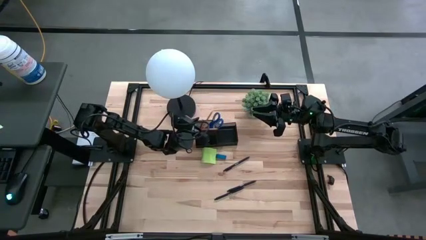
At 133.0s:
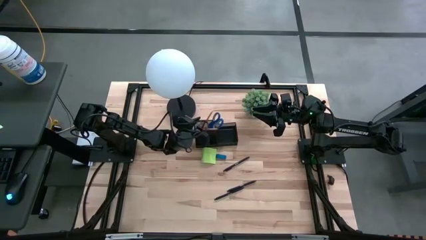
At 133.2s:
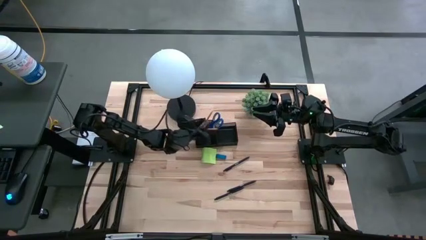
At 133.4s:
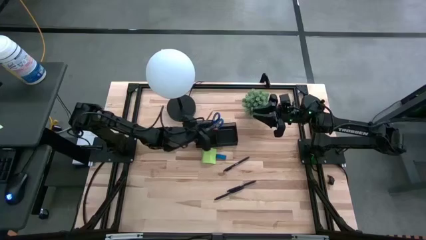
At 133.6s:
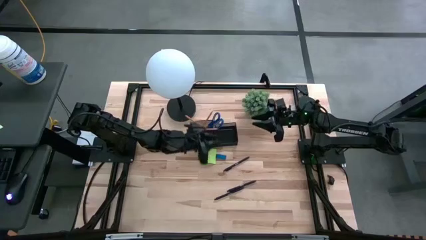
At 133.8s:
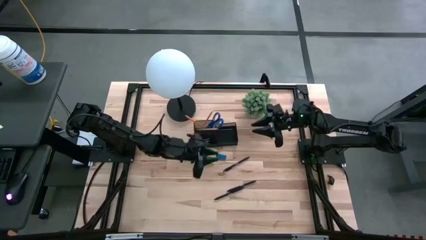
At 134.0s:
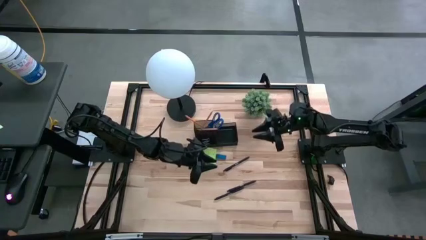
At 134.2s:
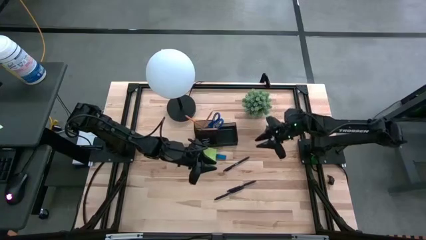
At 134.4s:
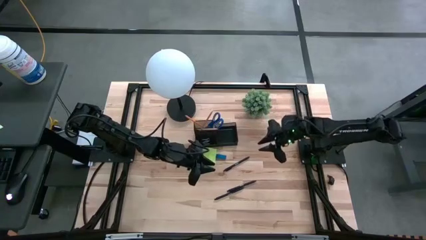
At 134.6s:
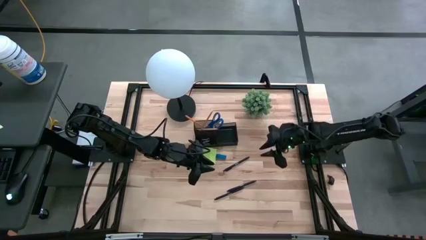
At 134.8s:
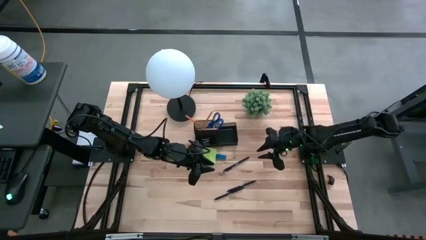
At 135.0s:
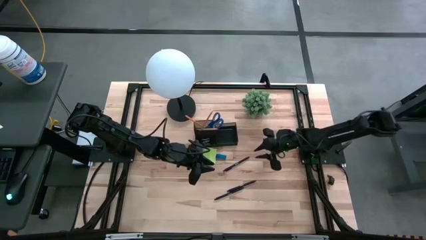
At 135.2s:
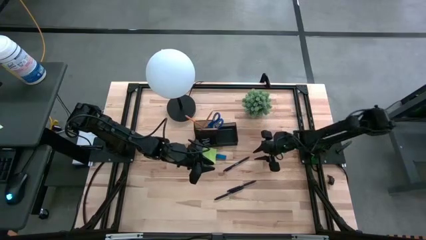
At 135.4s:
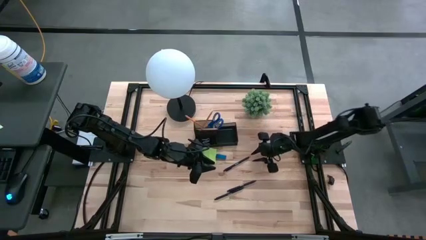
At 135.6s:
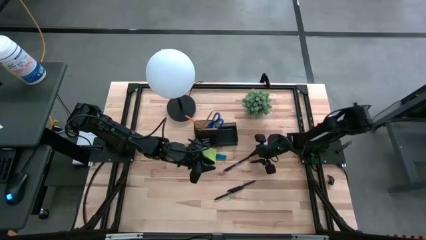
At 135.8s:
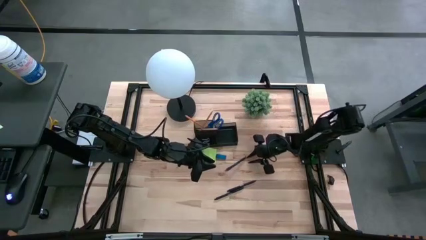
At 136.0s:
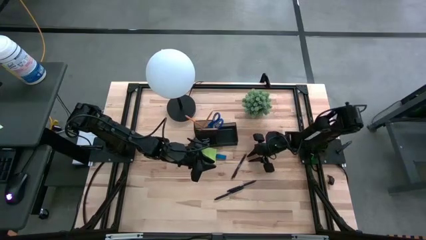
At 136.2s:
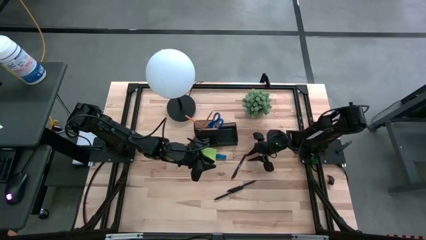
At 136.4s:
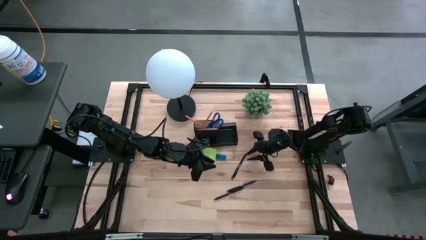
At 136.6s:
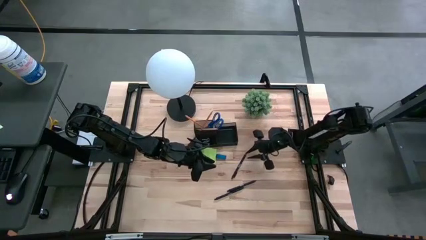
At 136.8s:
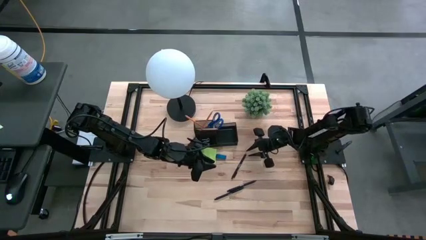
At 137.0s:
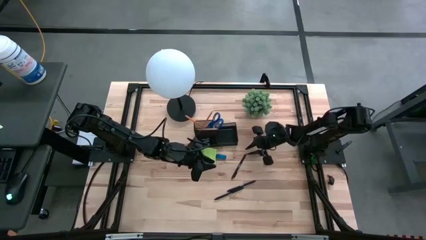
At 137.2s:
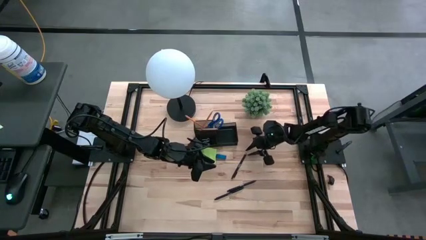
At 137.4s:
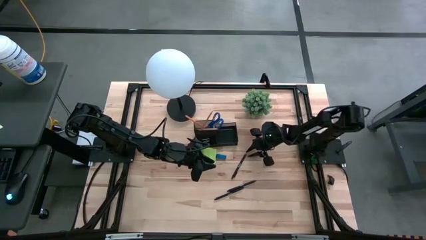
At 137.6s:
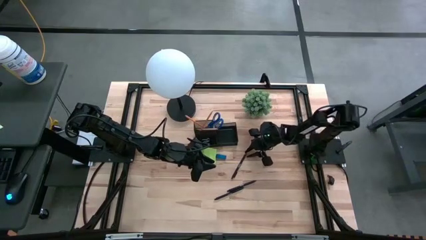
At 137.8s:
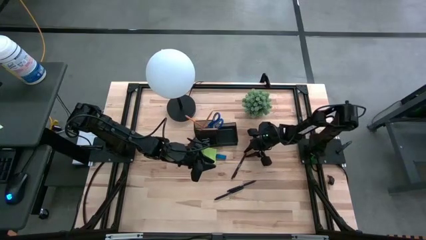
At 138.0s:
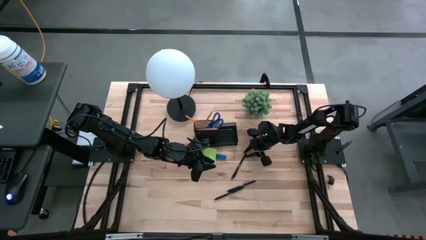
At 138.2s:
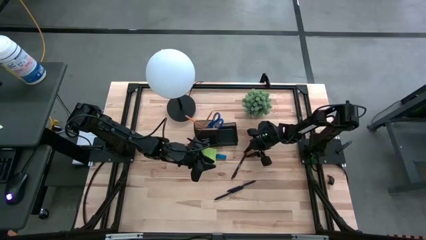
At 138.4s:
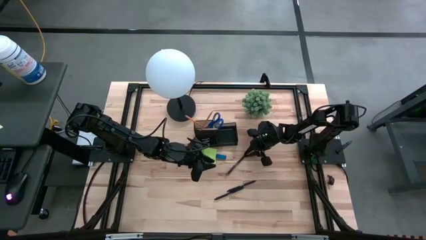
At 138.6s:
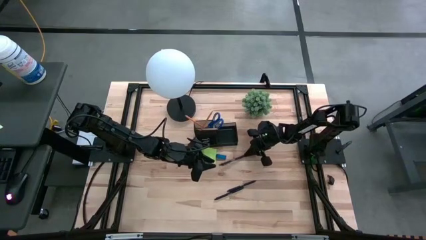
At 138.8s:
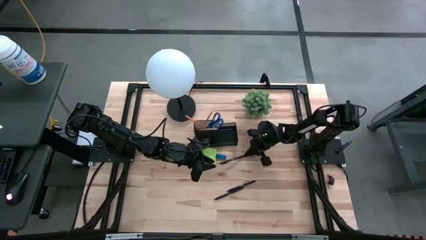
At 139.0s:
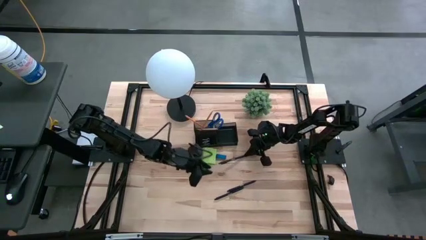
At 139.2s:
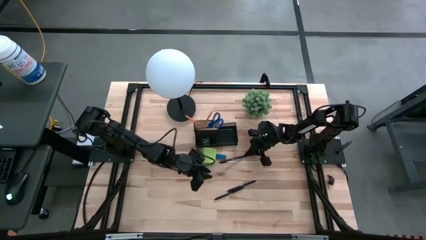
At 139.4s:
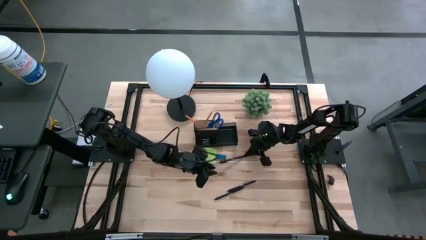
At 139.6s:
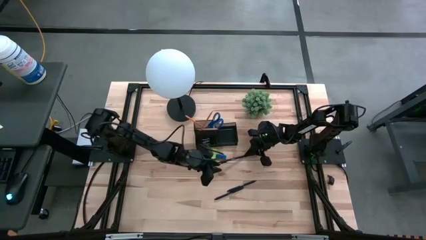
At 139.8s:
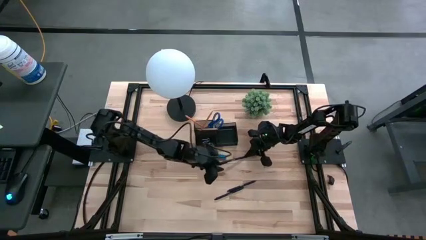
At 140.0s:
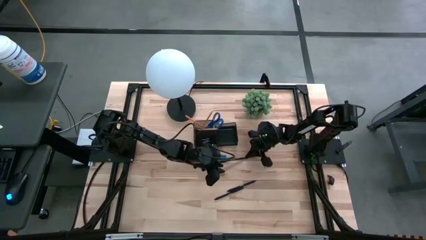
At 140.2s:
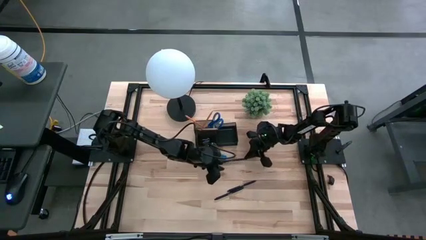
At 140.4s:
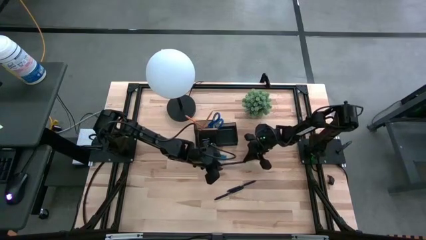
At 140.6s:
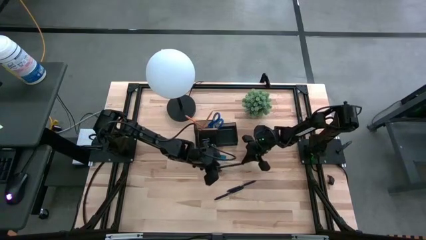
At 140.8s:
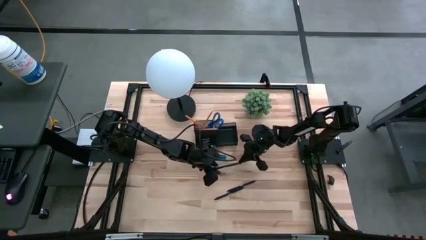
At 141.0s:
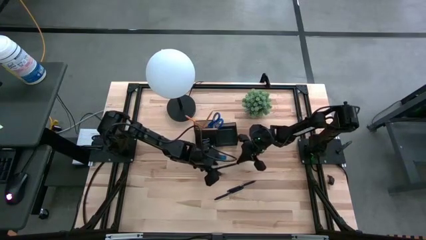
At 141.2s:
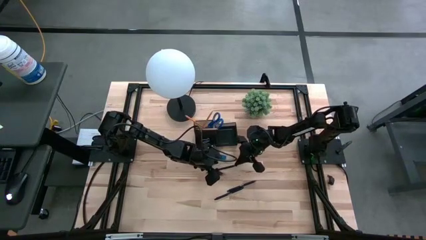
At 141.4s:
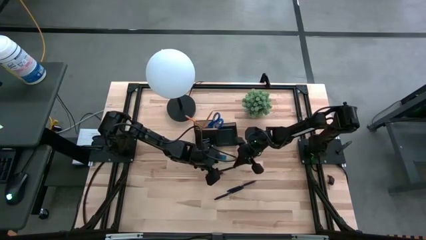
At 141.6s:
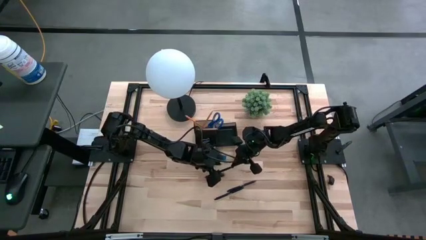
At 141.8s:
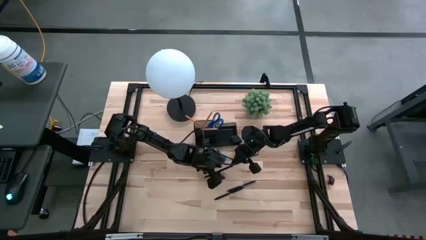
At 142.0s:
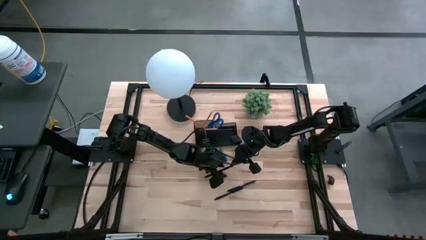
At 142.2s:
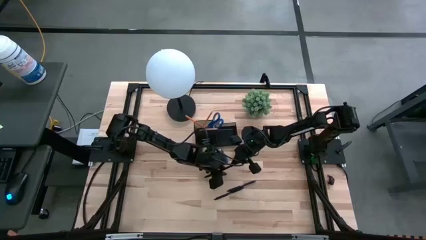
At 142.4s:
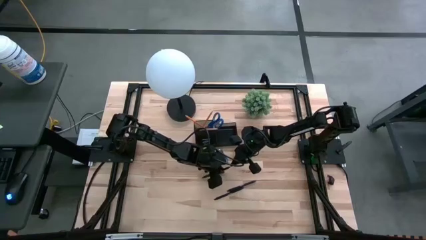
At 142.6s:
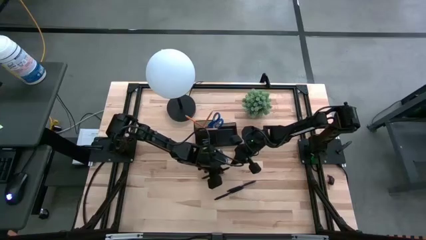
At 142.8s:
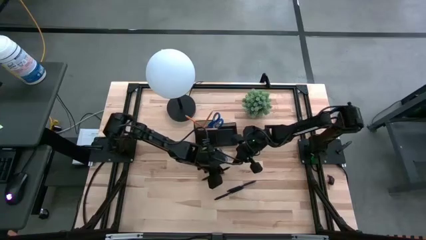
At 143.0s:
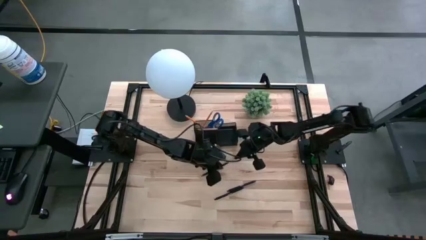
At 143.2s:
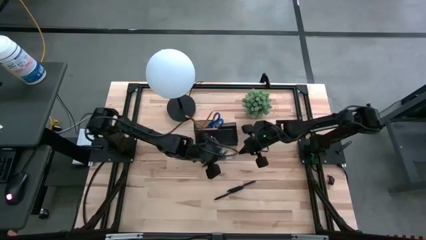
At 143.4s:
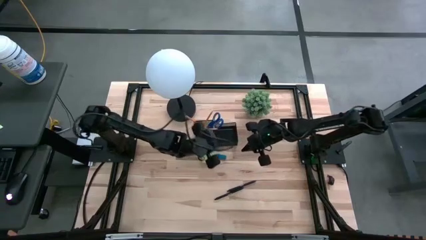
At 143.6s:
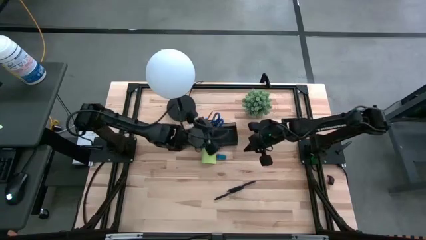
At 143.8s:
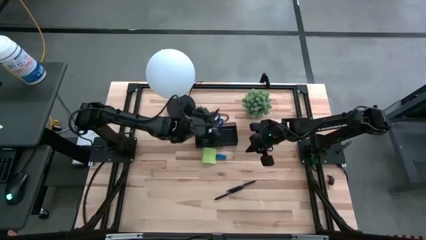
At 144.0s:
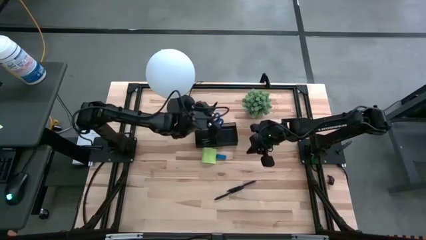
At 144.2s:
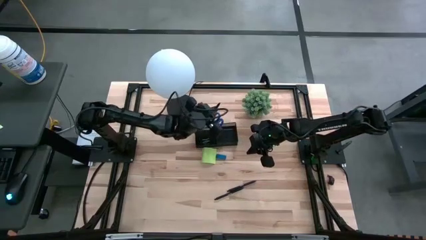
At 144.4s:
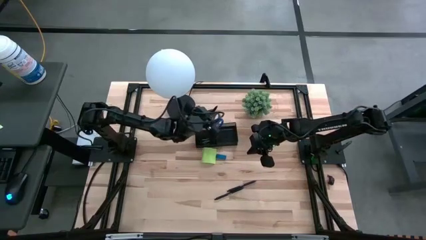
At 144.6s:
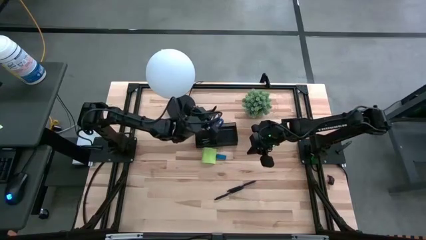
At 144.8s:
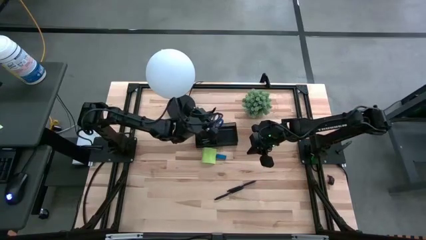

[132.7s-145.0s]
Task: Pick and place office supplies into organizer
Put the top black pen into the top left side of the desk organizer
